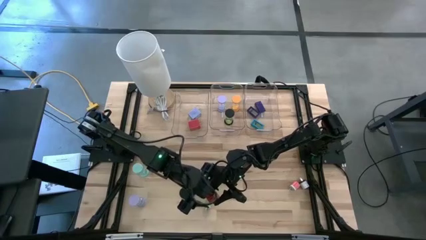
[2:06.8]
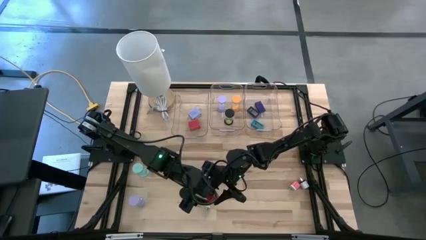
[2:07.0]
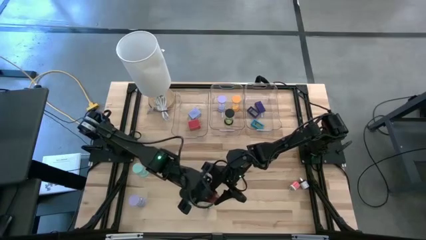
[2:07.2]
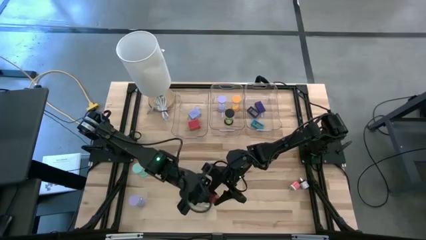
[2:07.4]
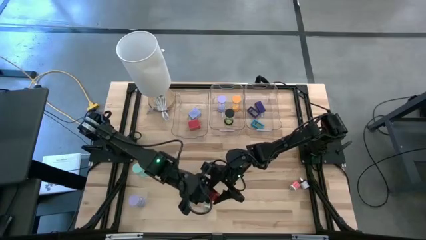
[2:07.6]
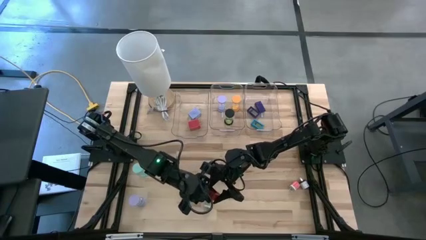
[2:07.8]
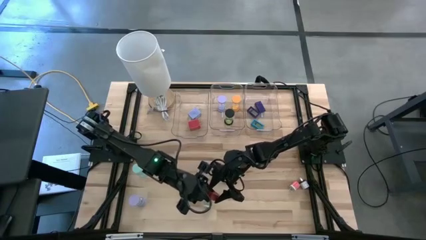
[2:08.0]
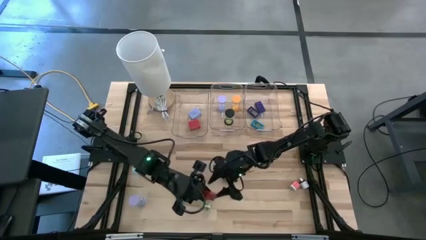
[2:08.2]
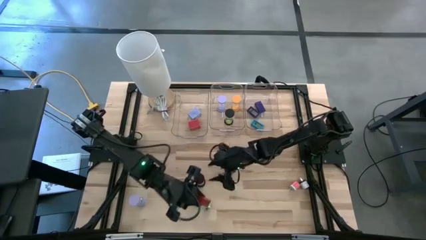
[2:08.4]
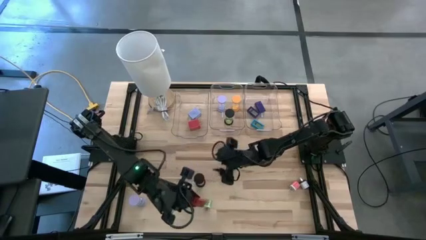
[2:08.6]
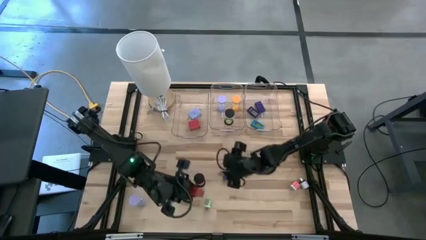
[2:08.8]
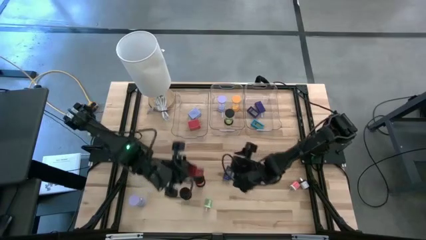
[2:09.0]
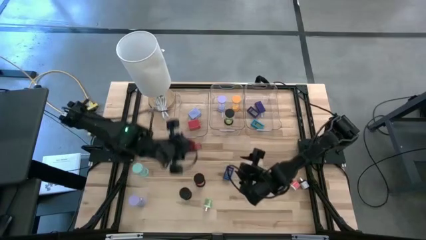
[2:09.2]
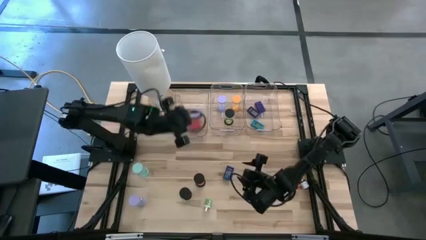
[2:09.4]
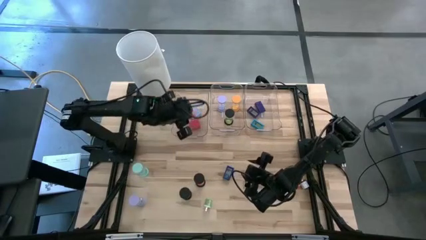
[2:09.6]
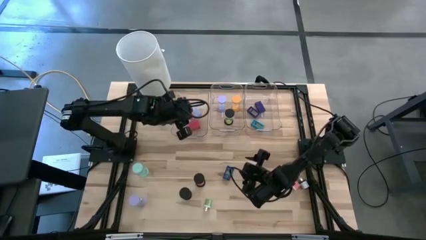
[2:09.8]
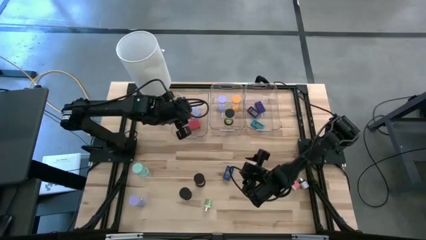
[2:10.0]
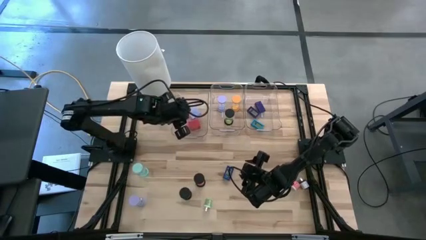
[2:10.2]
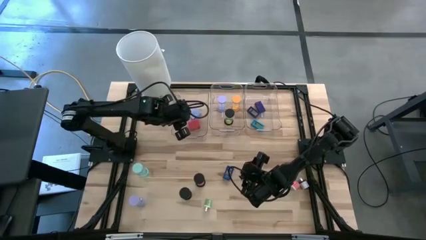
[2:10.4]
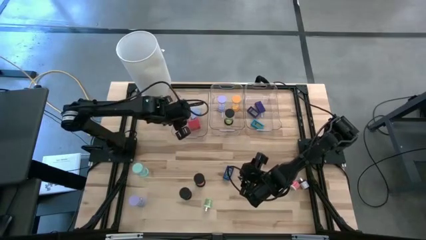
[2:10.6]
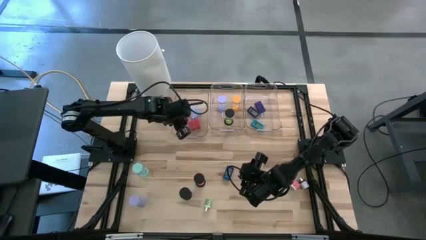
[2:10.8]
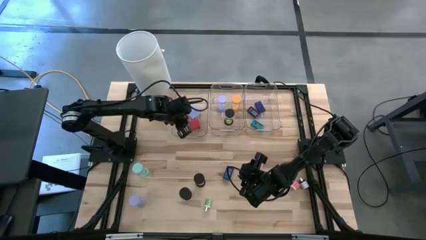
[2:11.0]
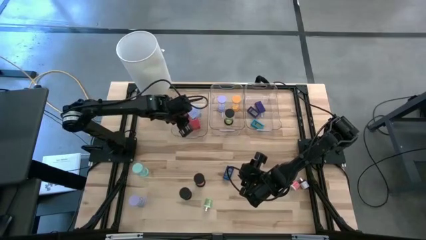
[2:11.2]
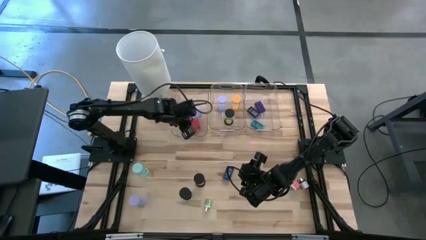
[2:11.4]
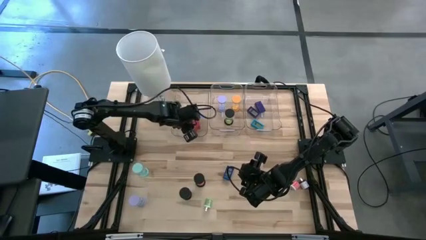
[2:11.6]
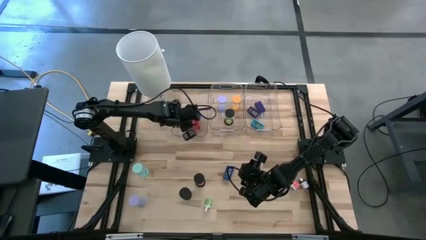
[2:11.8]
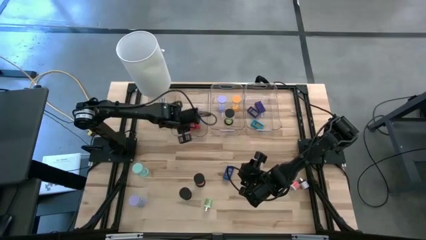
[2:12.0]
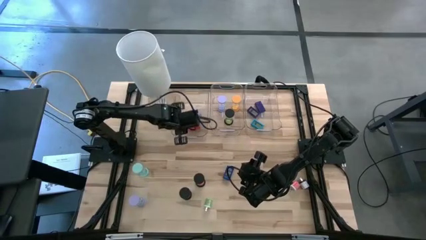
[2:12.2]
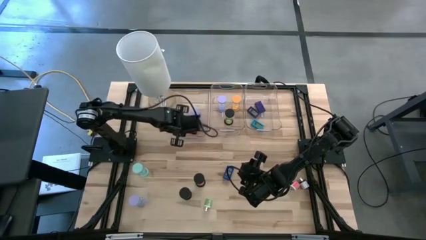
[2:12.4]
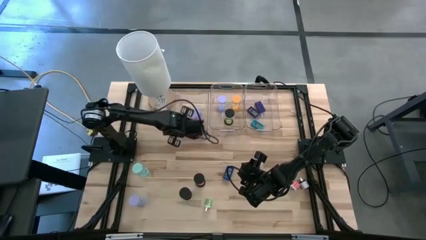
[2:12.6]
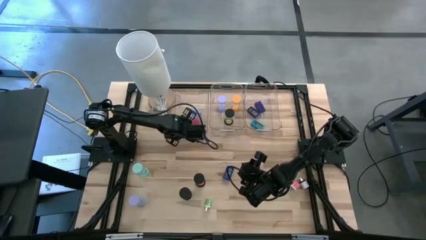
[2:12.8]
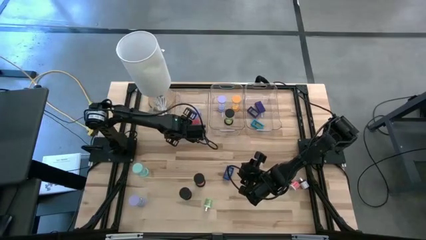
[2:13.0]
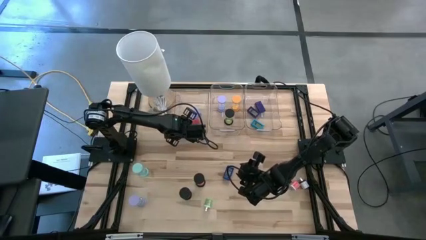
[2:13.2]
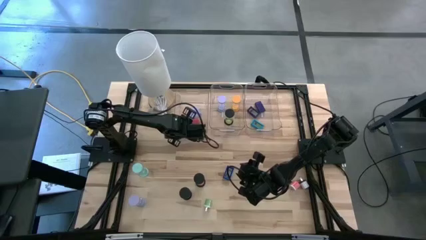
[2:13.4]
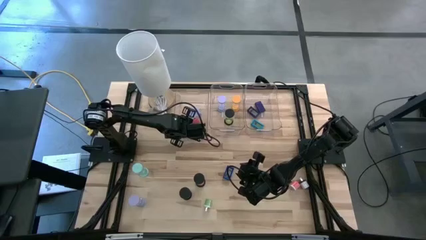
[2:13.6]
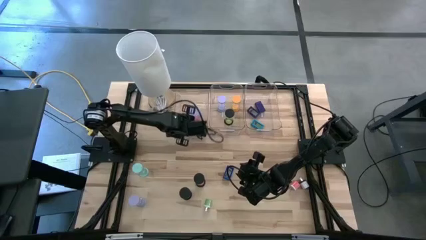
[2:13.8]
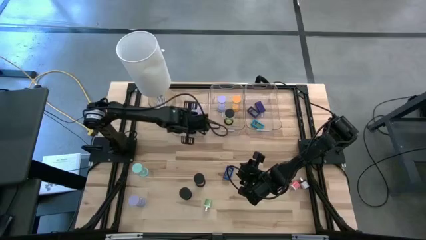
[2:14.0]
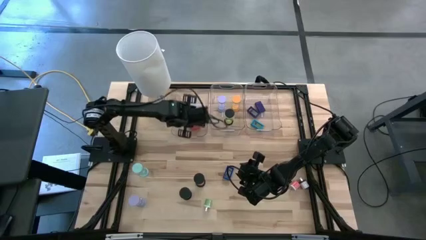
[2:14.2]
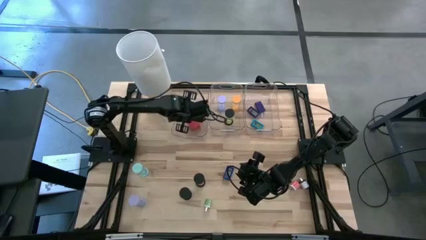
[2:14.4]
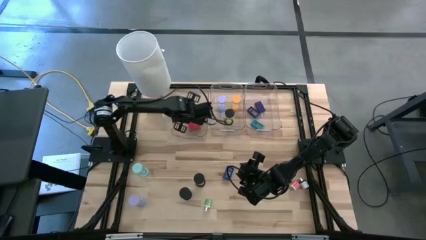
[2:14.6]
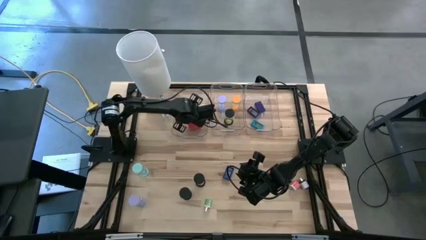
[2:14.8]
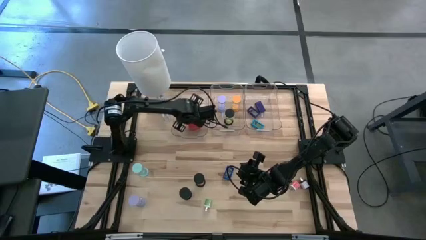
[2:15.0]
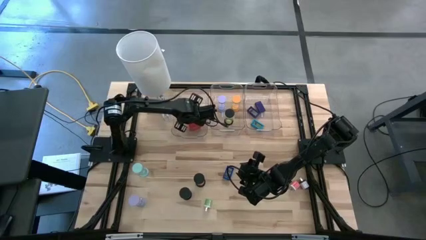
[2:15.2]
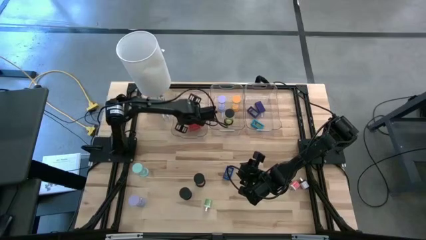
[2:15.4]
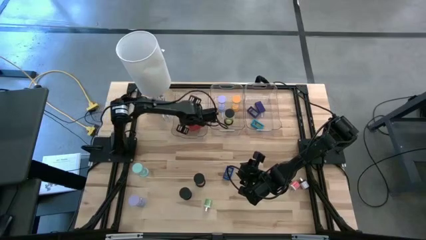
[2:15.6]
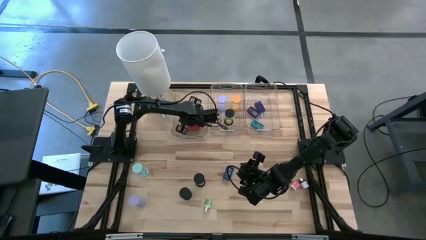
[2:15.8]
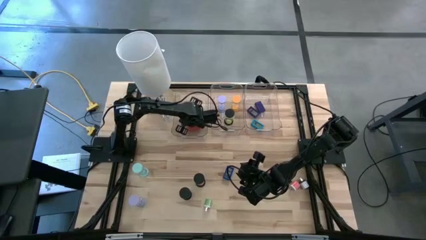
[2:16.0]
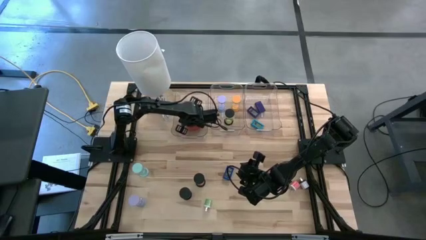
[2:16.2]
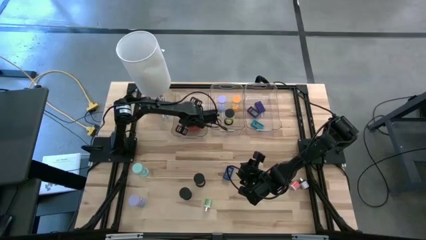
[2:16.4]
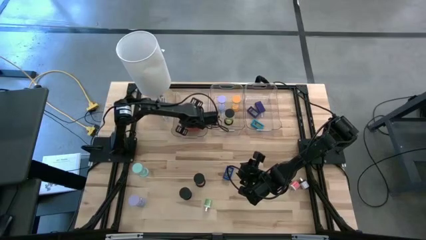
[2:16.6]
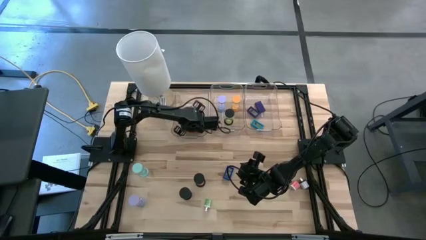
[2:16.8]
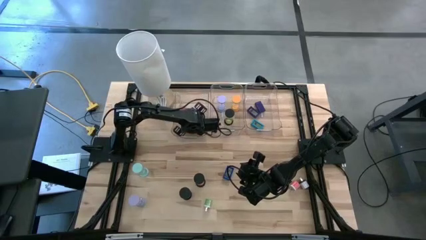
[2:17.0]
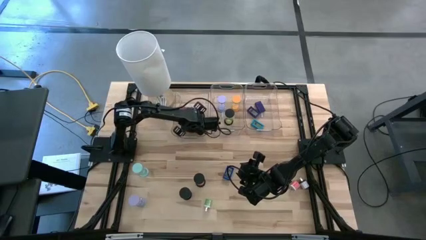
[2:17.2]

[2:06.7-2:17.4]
Task: Pick & Place Office items
Put the red charger adapter into the left transparent bin
